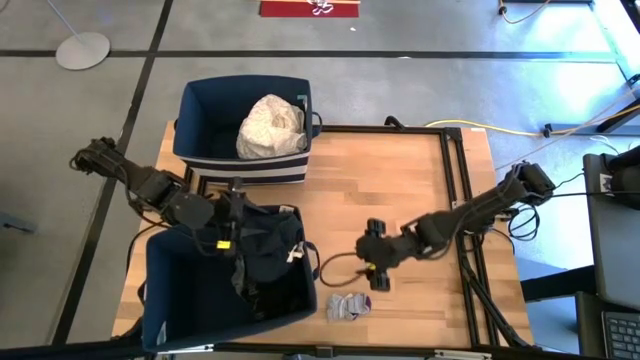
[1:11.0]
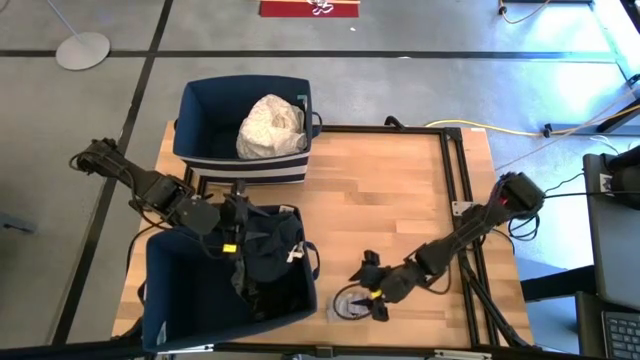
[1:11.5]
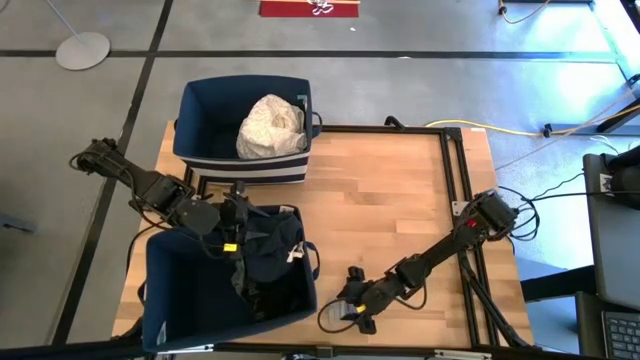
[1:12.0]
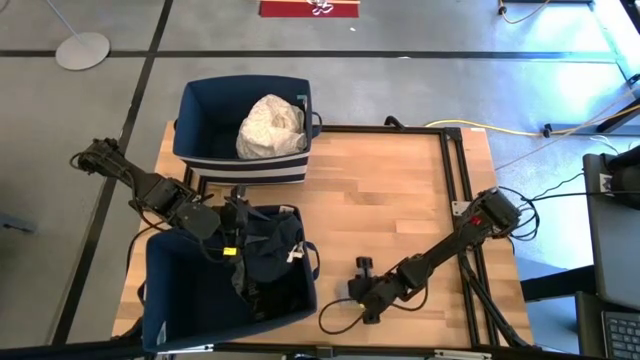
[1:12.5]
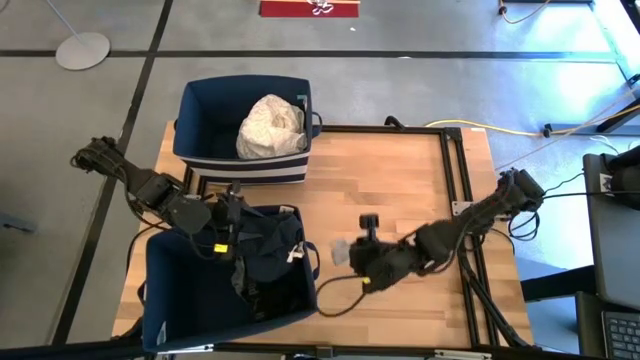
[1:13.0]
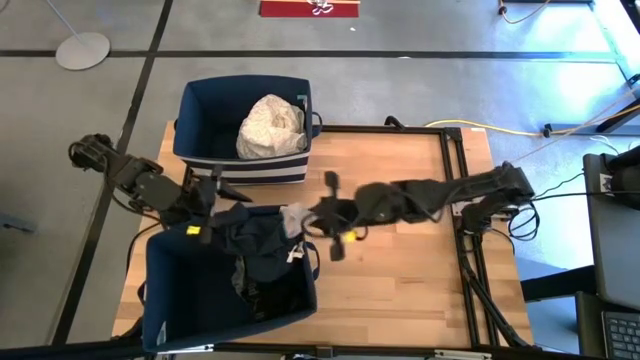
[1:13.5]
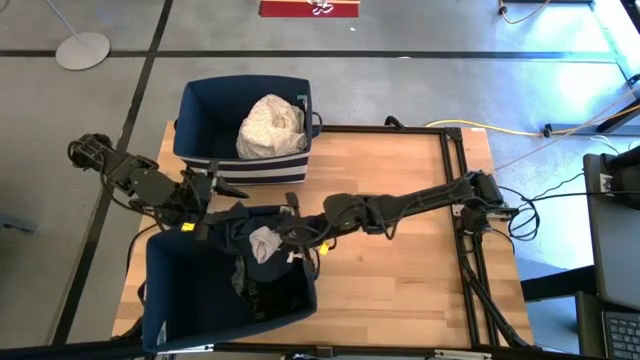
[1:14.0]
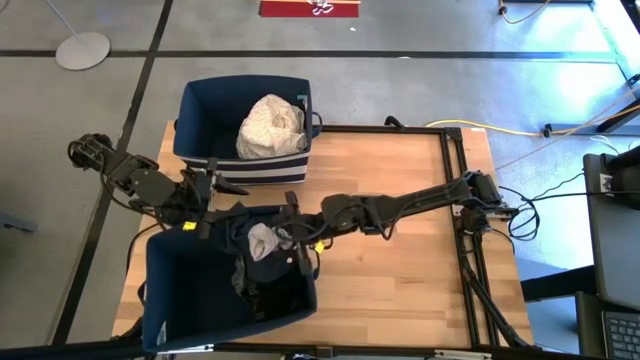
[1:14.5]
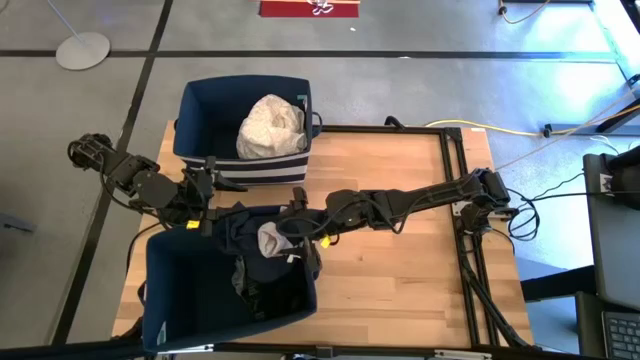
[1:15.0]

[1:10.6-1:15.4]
Task: Sort clothes
Put the gray socks into the bottom blue laundry organizer

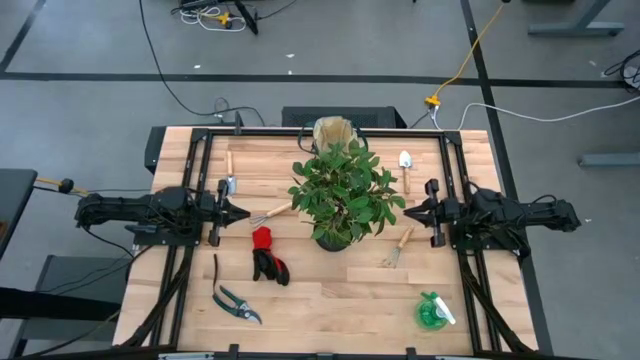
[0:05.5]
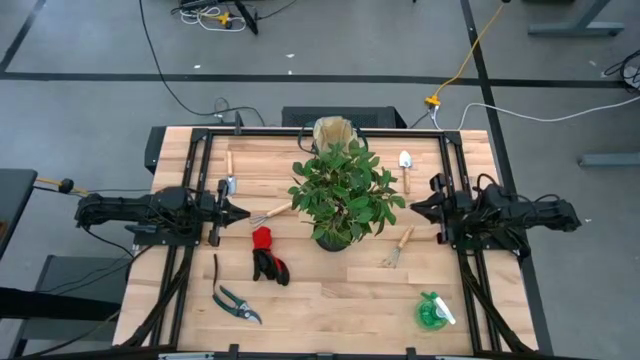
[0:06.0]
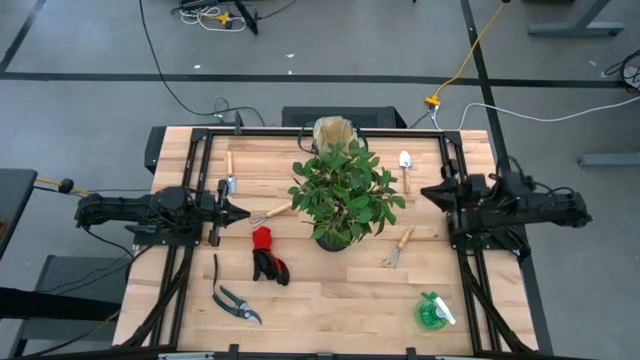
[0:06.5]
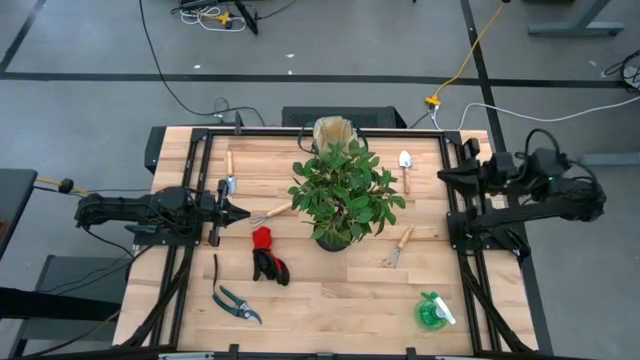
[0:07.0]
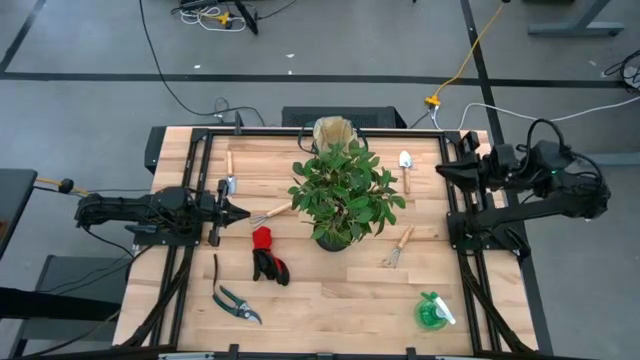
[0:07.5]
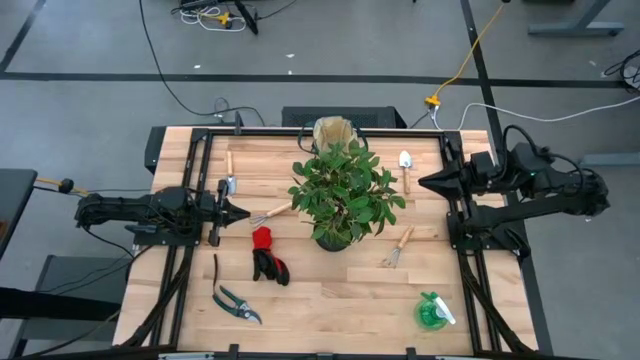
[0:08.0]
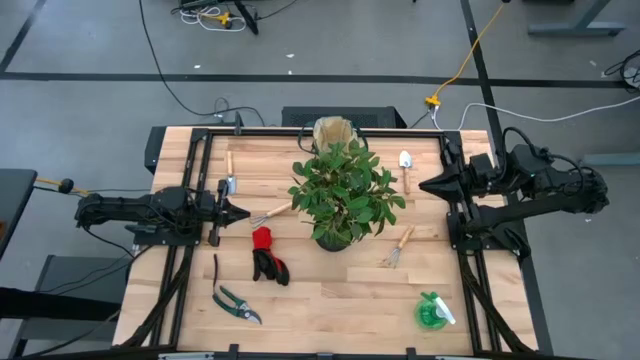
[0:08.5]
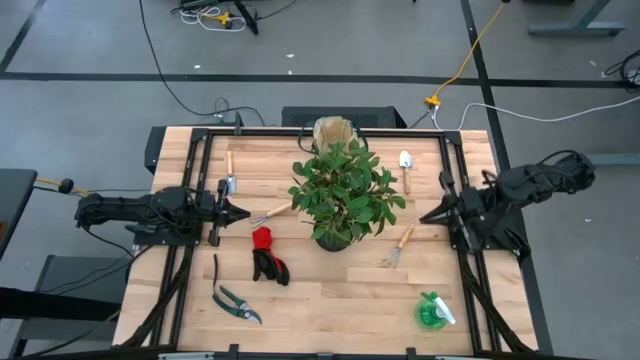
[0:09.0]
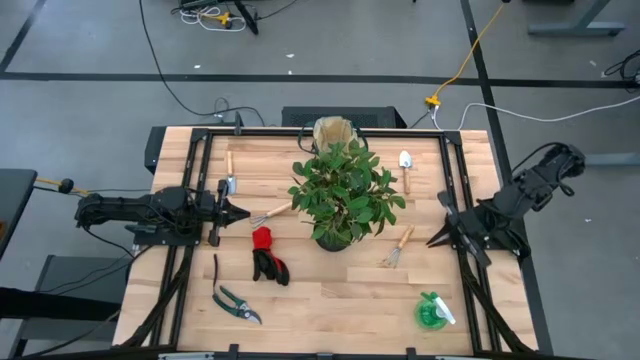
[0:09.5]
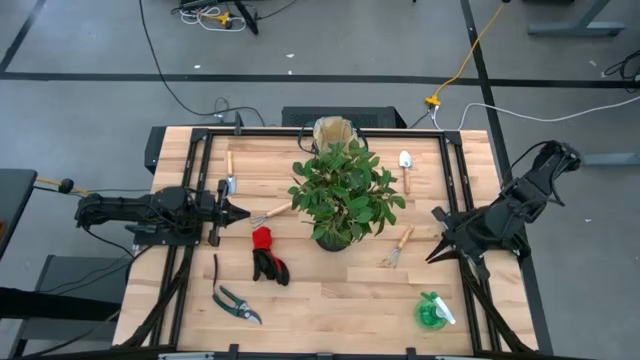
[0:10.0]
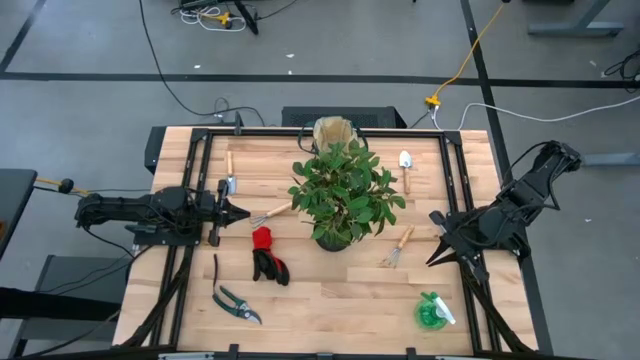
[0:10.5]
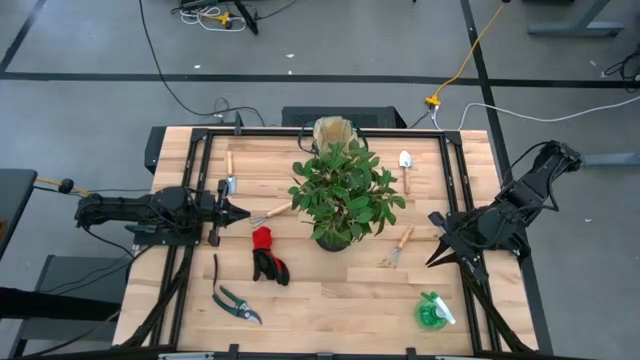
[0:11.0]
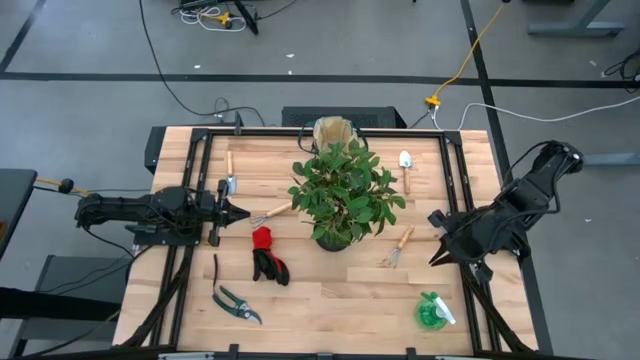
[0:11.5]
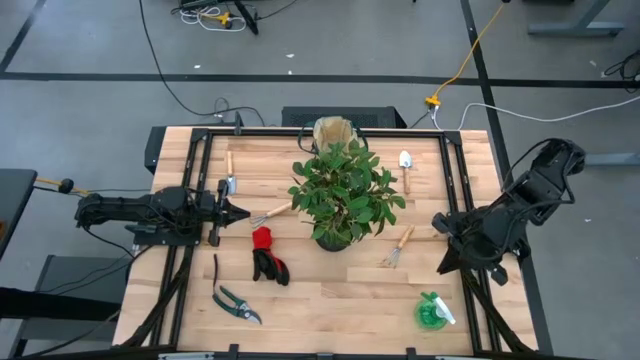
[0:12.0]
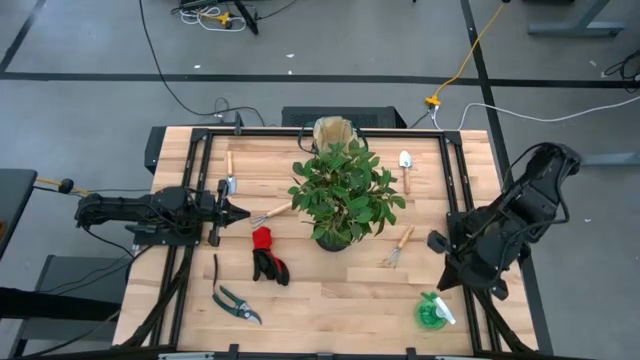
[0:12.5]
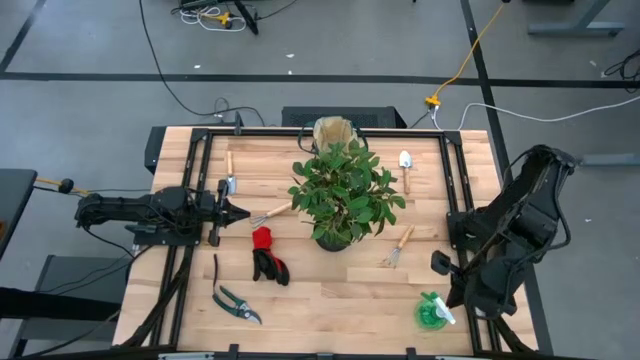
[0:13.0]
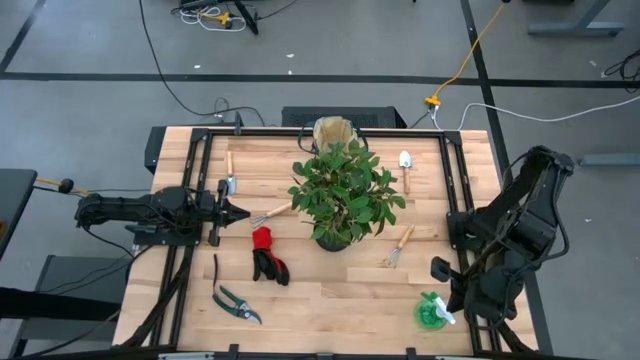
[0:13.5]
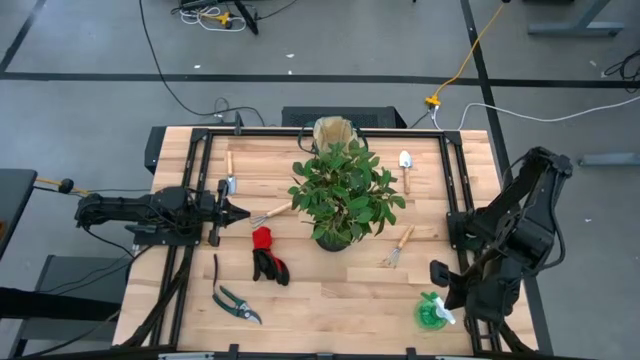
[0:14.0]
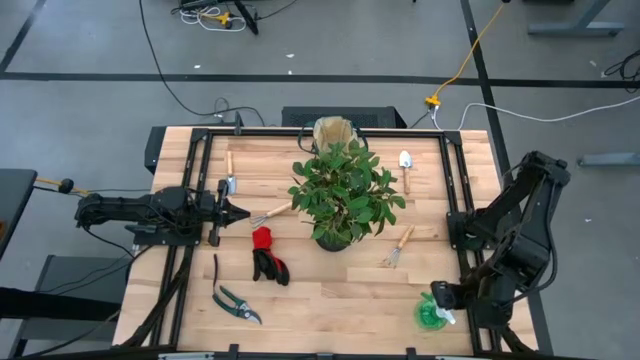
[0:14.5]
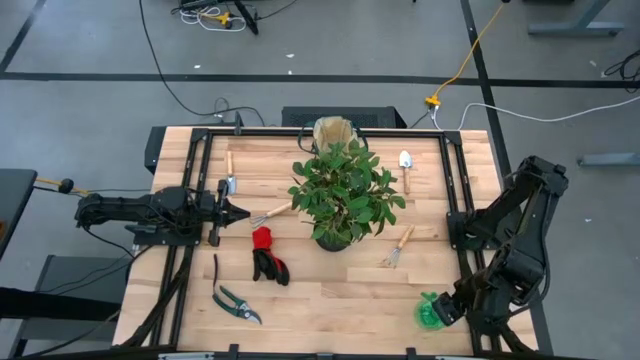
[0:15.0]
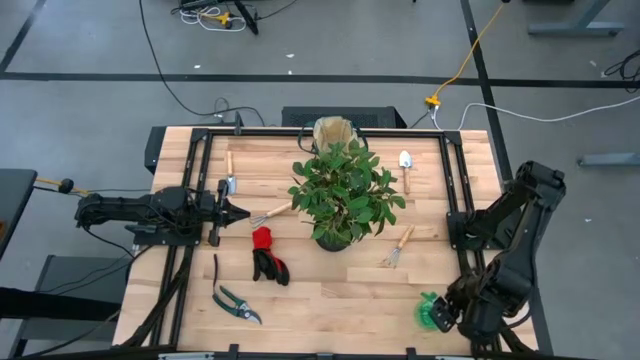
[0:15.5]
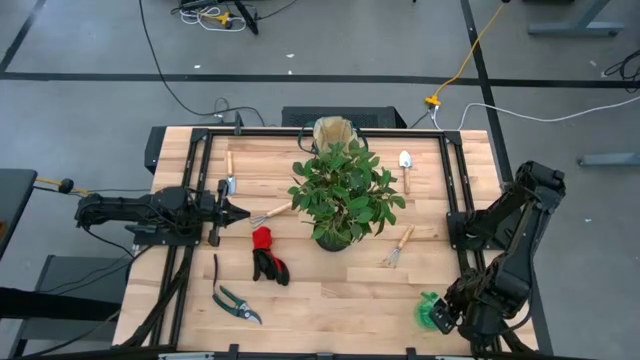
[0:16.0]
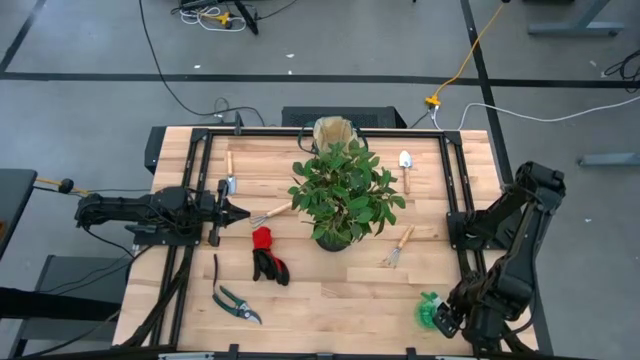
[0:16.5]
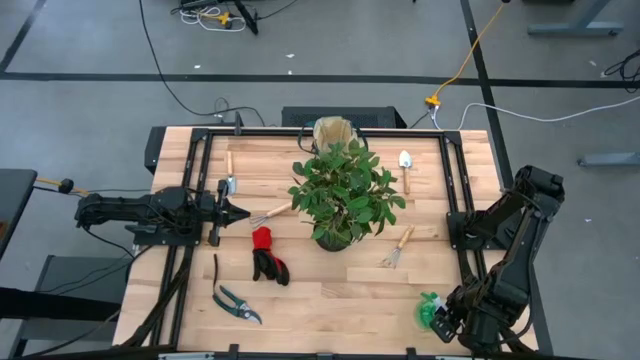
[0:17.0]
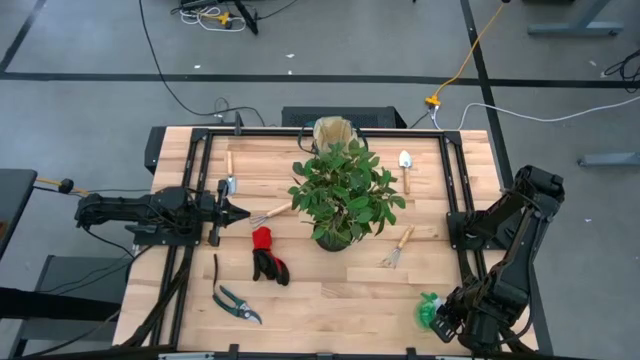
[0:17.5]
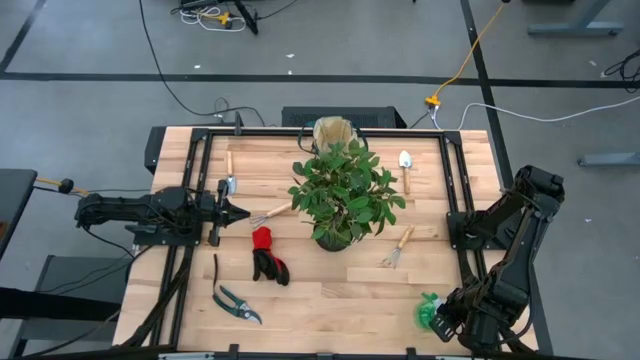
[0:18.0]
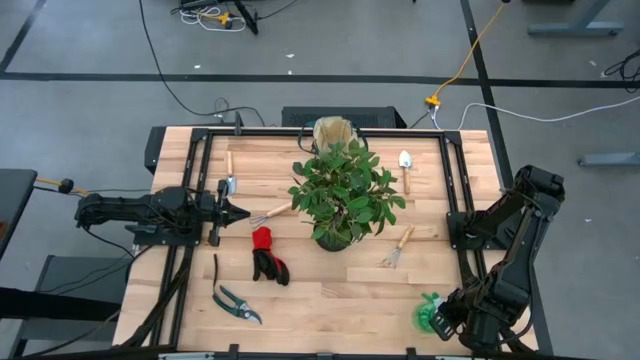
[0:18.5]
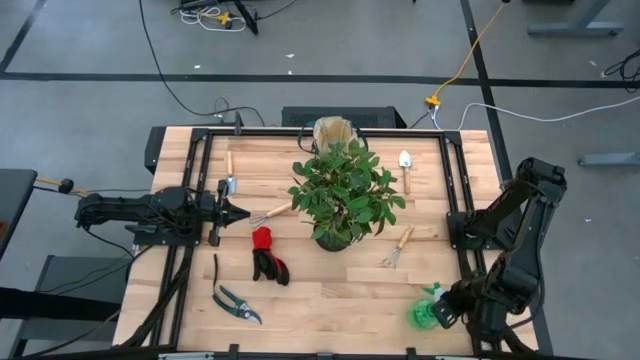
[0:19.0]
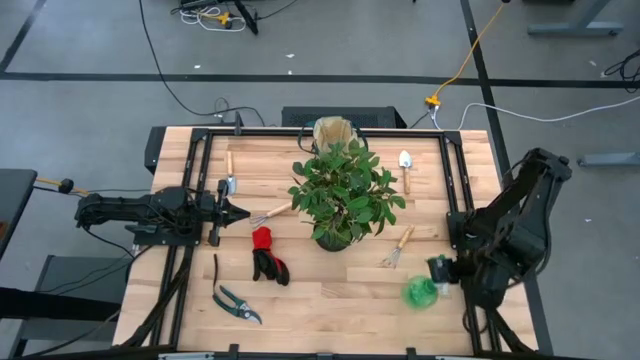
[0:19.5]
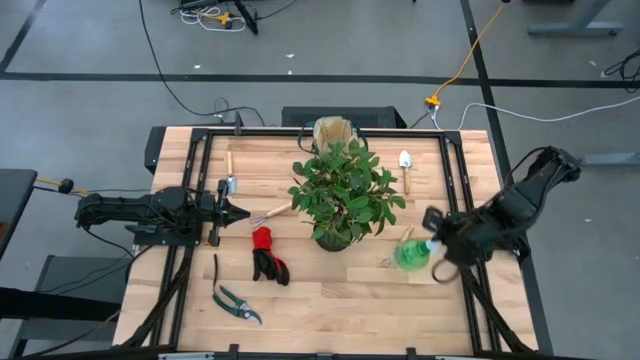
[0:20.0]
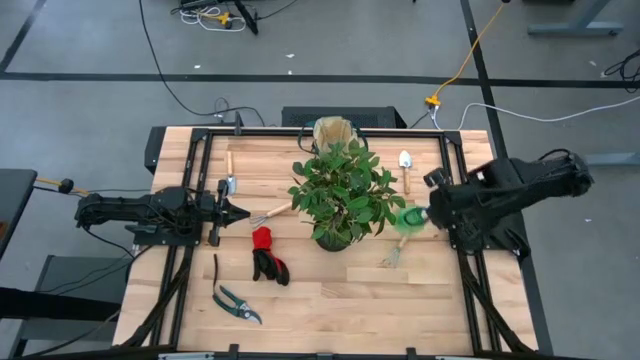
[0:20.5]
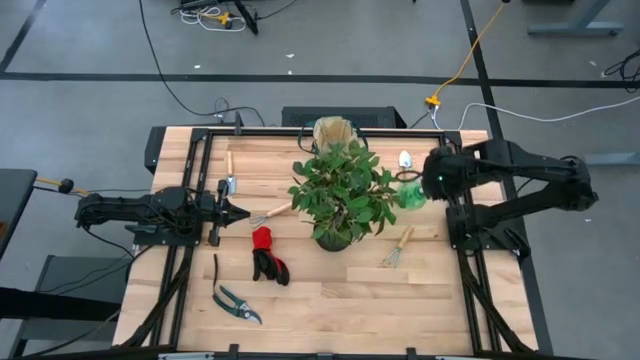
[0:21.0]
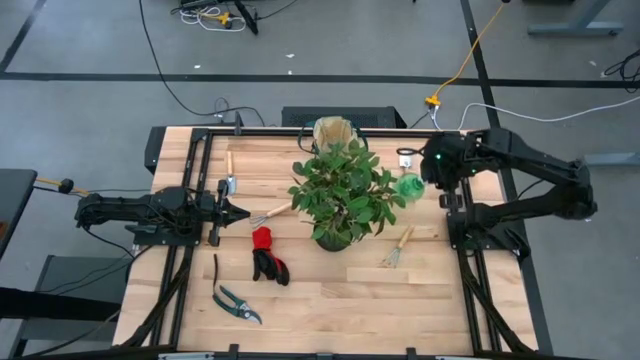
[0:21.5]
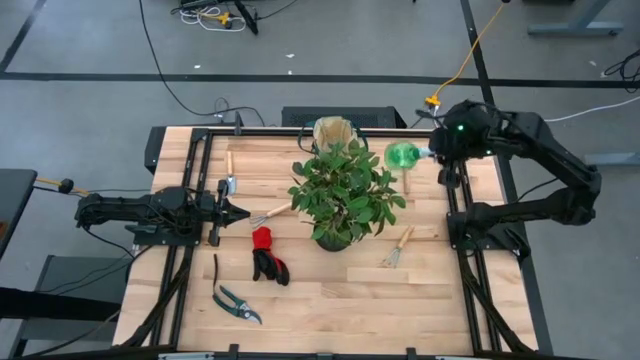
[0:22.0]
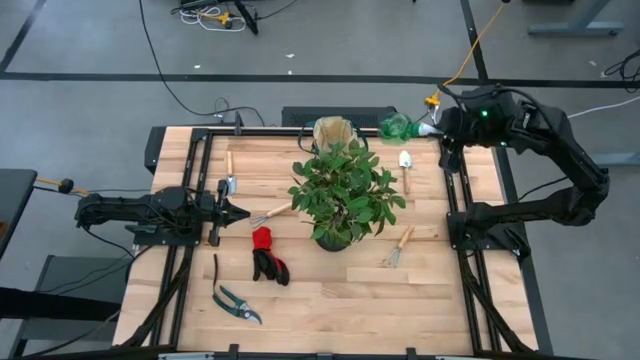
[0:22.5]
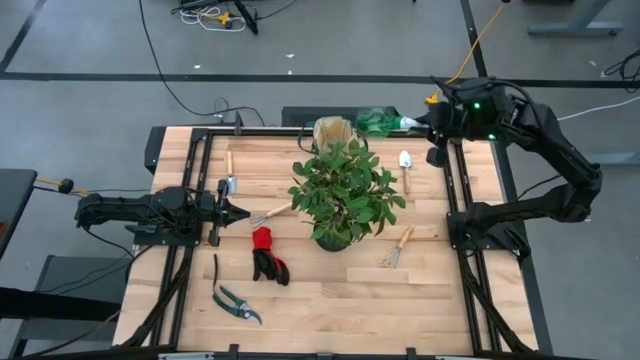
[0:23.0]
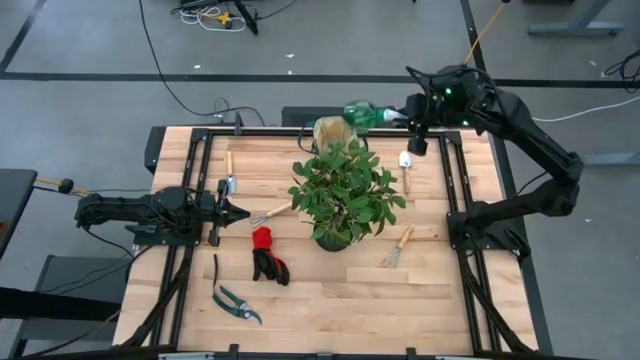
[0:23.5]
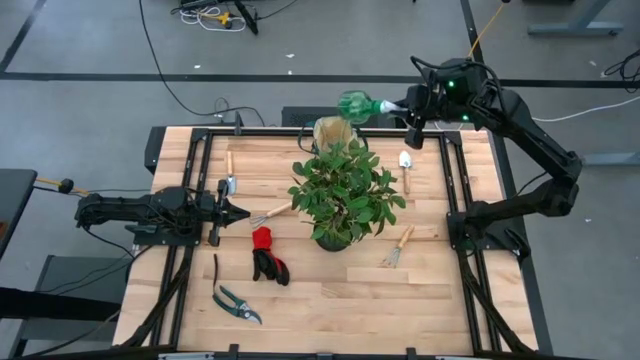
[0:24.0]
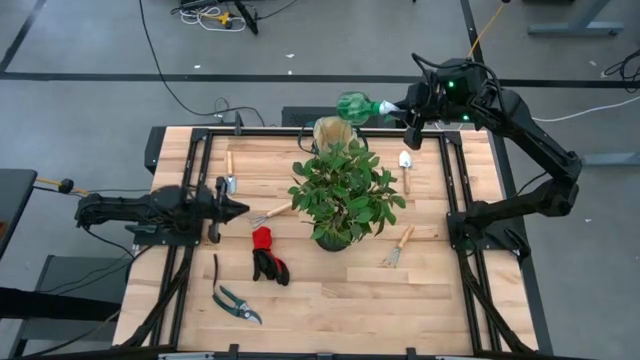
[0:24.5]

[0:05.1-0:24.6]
Task: Pick & Place Garden tools in Gardening bag
Put the green spray bottle into the gardening bag
